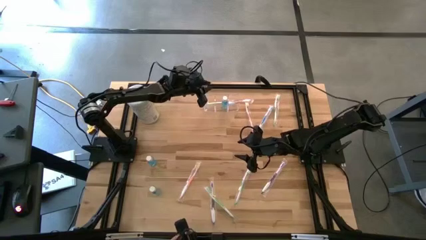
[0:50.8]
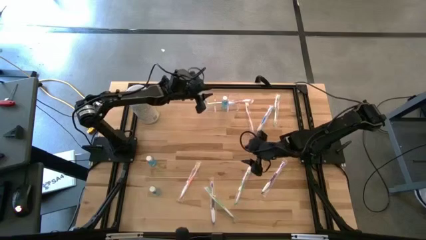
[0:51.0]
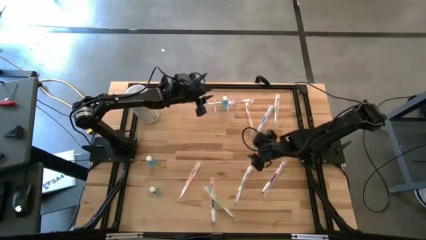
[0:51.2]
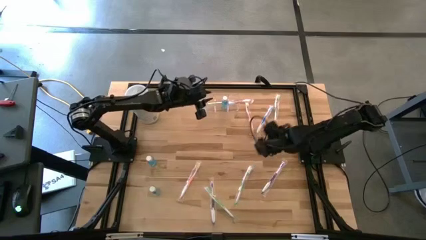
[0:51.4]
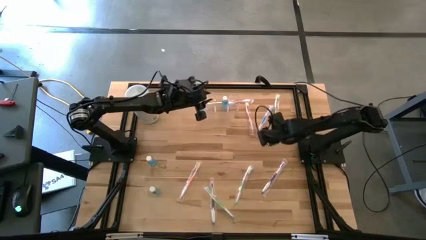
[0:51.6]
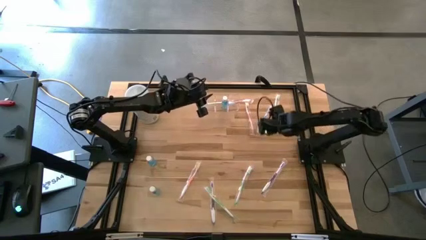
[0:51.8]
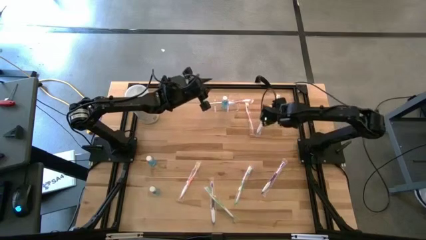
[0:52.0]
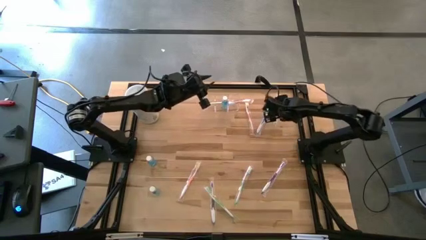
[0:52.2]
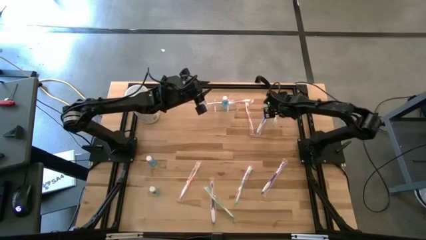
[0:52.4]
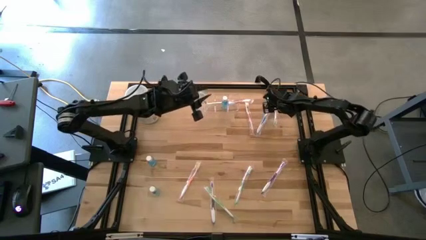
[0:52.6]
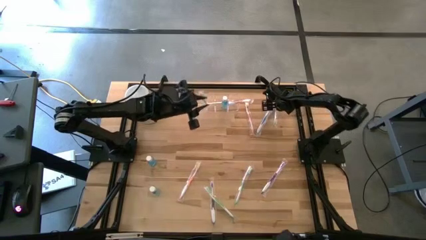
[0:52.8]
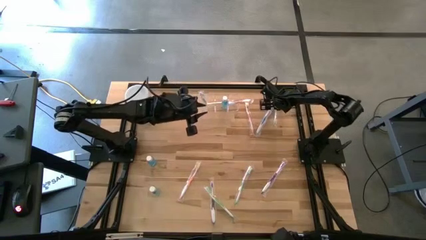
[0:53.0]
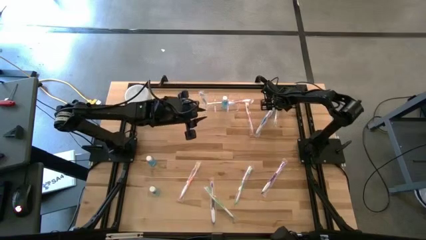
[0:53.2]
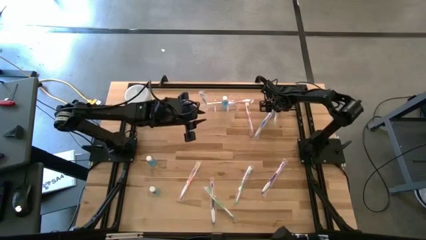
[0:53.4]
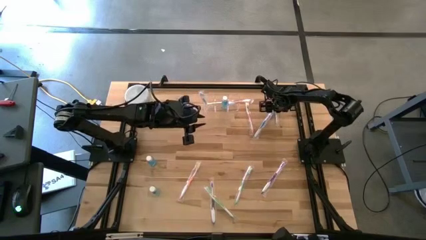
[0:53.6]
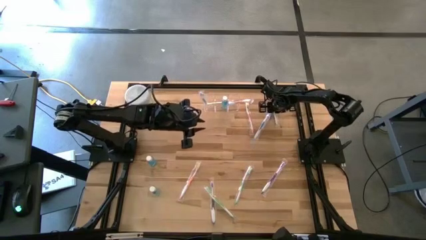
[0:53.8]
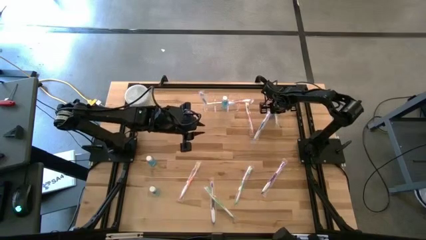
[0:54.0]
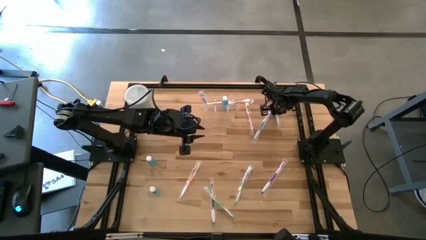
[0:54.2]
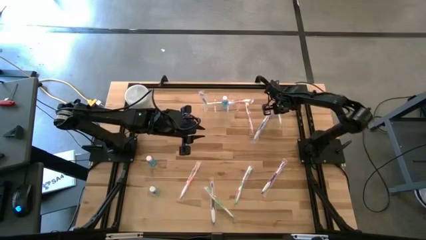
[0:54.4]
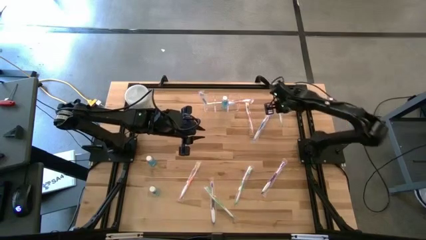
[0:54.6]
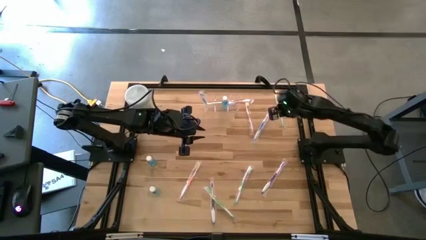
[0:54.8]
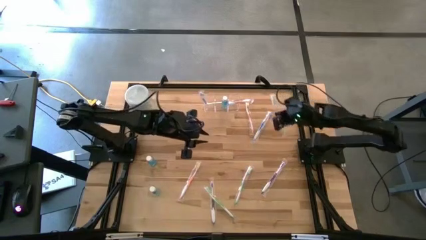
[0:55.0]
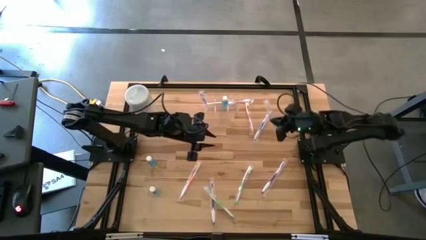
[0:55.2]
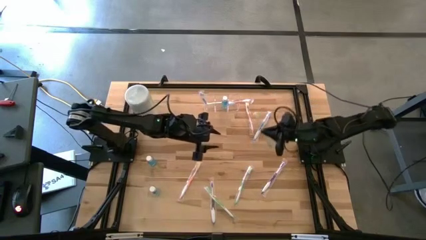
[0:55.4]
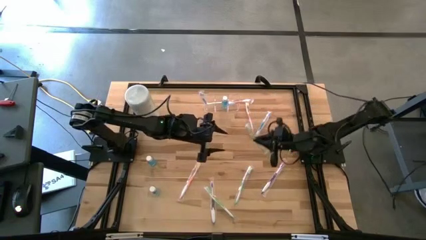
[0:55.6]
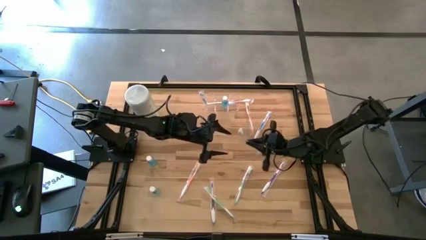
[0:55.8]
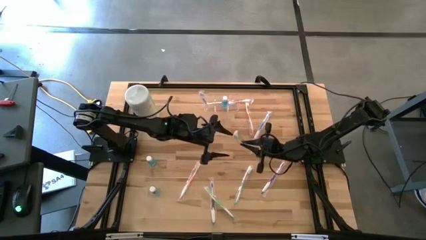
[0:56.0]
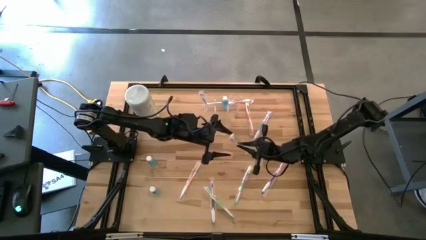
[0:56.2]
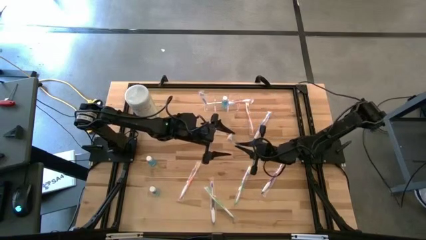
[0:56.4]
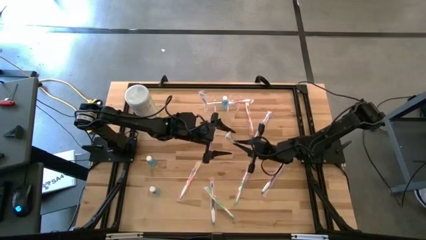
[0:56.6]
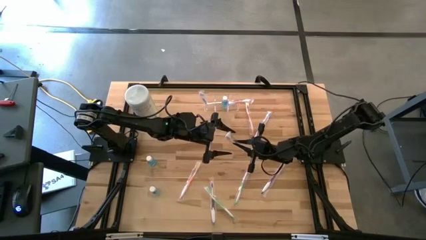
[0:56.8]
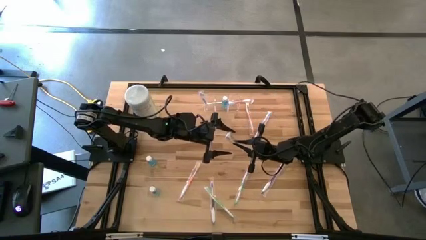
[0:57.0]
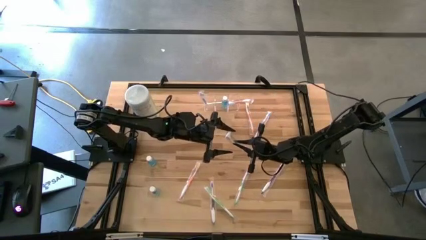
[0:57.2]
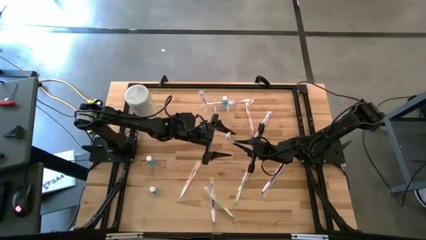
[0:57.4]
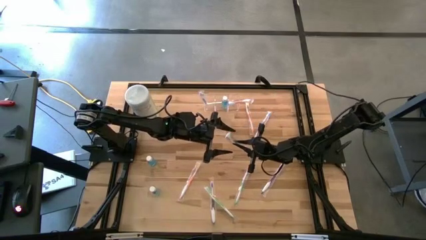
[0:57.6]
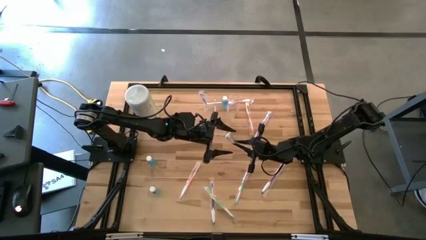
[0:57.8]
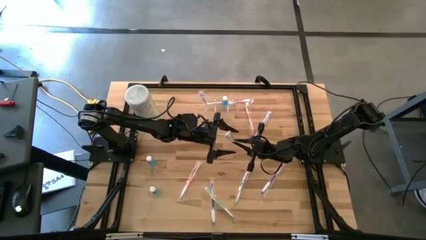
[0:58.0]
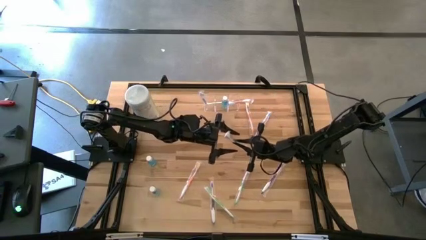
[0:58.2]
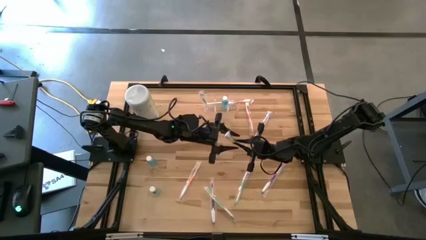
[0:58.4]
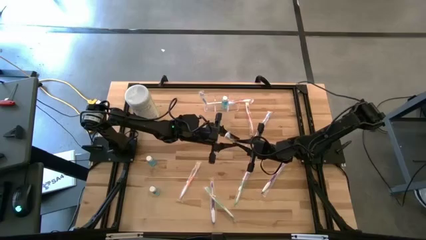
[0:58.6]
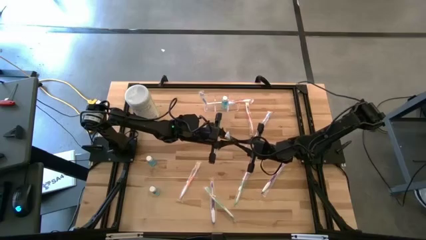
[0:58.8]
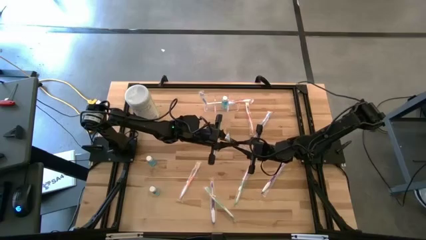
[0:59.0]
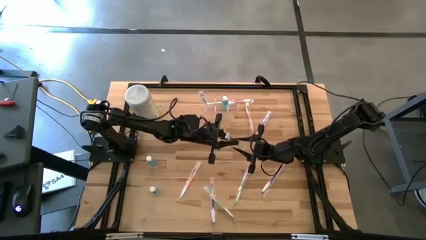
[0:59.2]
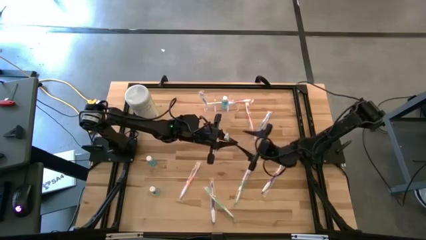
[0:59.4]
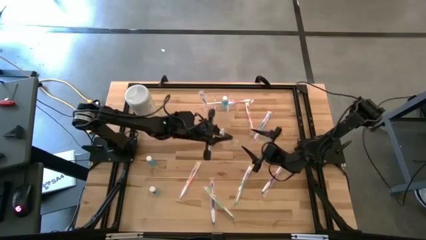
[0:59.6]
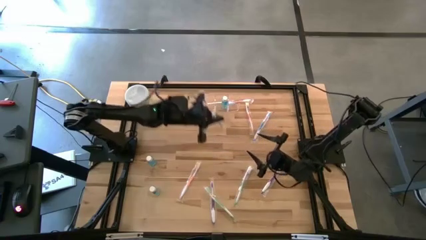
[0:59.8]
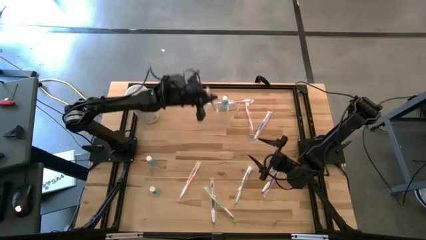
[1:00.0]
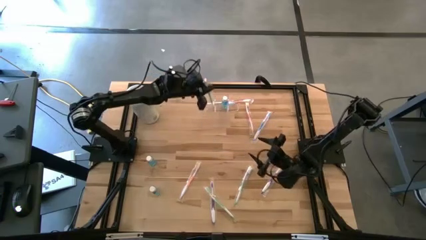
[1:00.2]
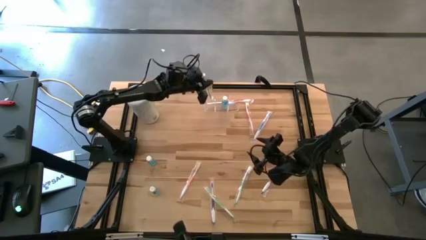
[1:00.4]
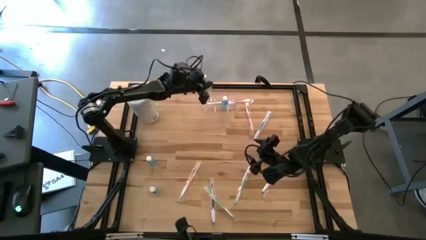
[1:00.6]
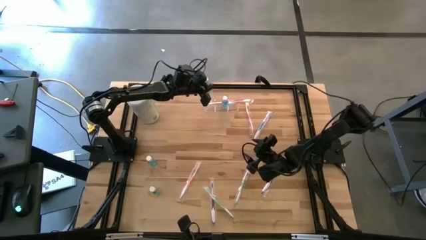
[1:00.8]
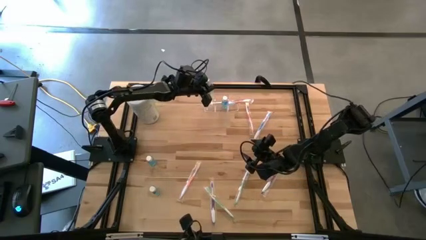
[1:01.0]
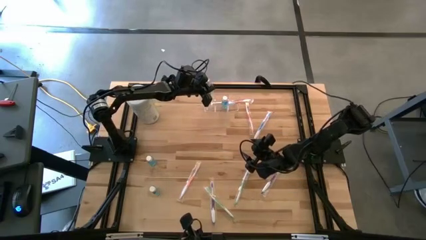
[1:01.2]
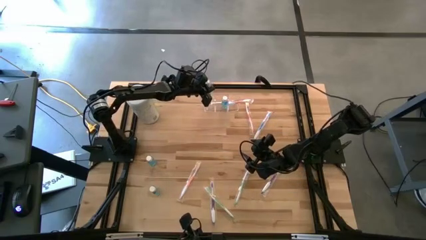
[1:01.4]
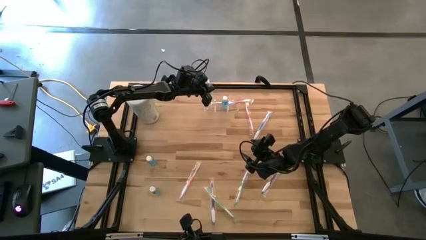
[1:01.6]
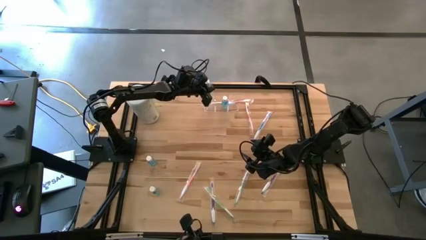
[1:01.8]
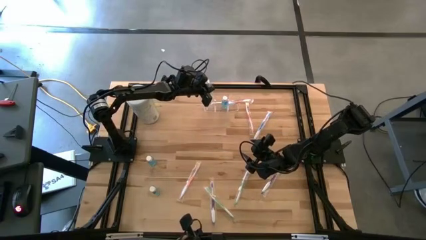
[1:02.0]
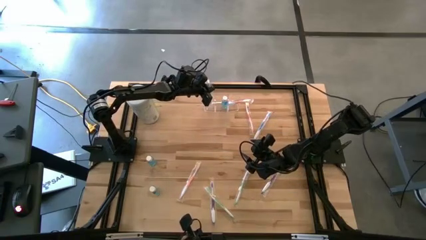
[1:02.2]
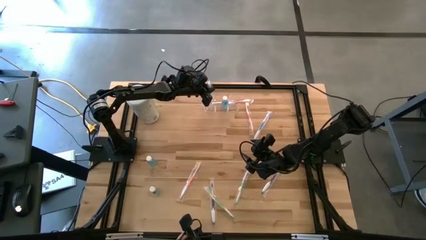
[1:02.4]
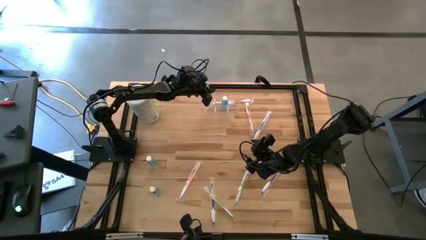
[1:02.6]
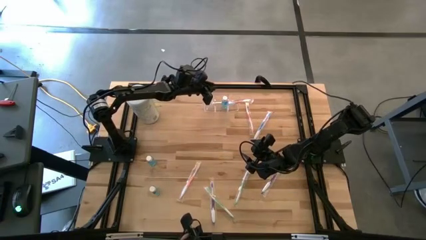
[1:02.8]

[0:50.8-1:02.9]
Task: Pick & Place toothbrushing station
Put the top right green toothbrush into the transparent organizer

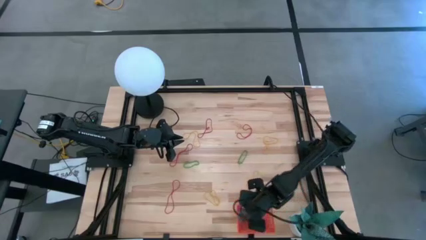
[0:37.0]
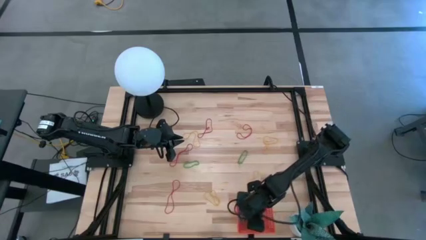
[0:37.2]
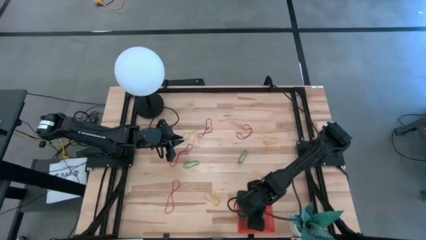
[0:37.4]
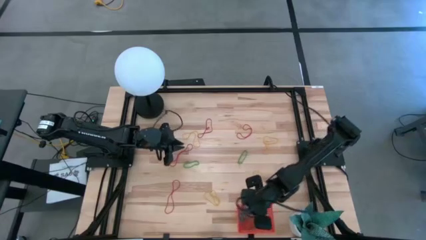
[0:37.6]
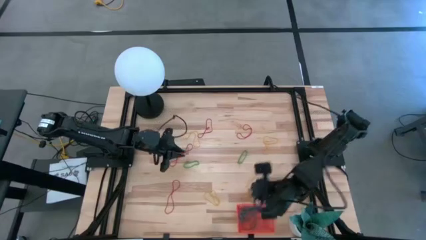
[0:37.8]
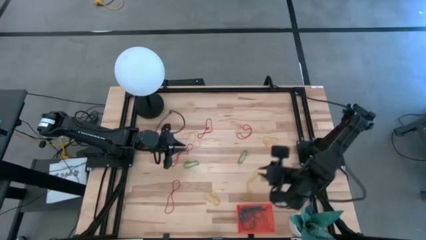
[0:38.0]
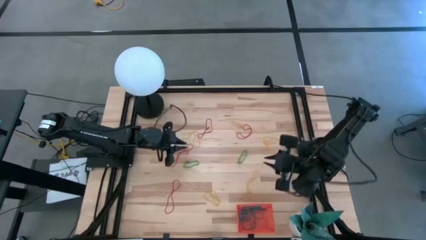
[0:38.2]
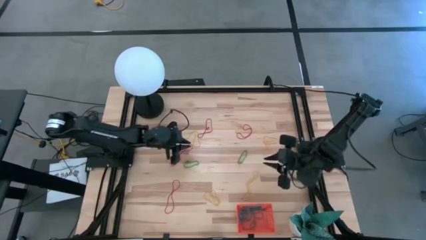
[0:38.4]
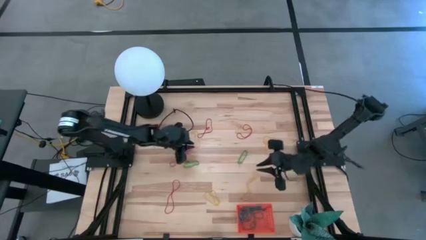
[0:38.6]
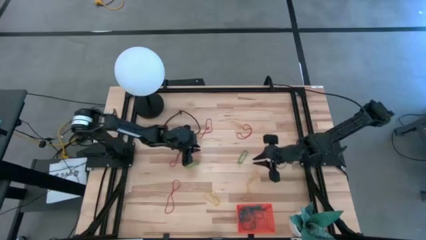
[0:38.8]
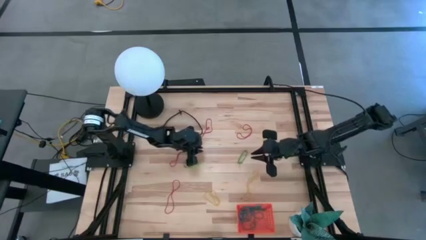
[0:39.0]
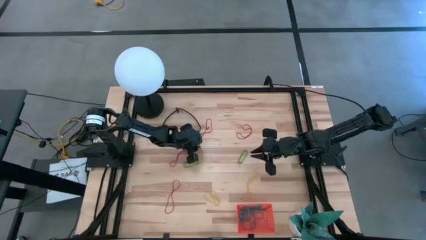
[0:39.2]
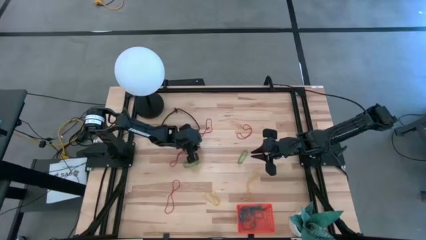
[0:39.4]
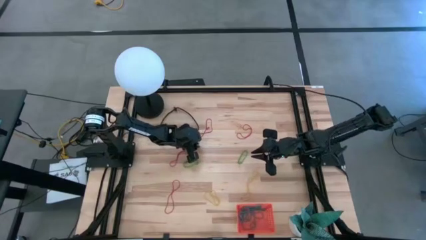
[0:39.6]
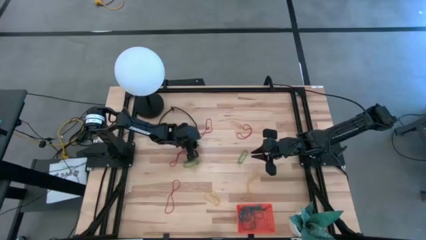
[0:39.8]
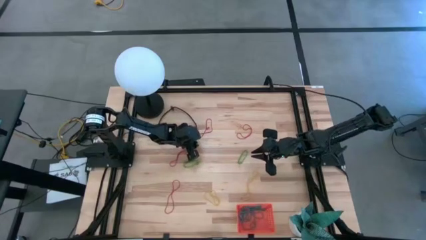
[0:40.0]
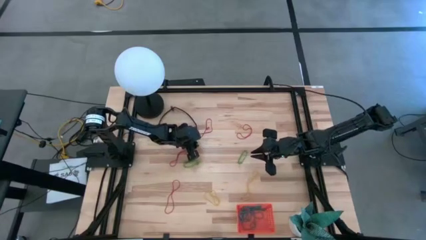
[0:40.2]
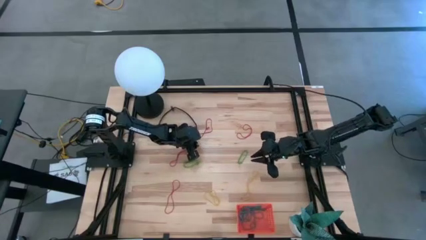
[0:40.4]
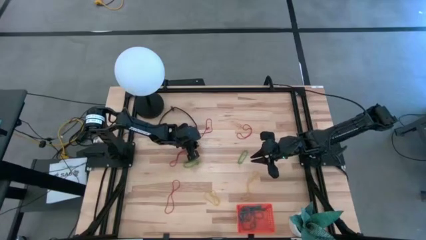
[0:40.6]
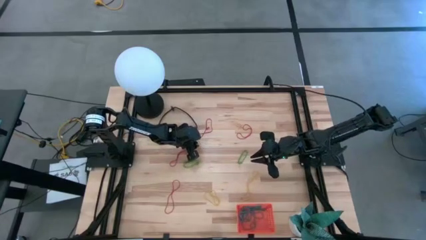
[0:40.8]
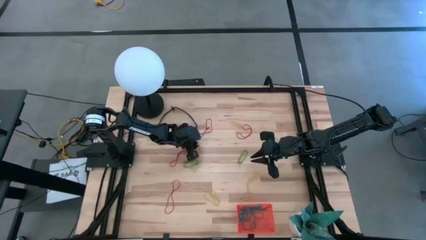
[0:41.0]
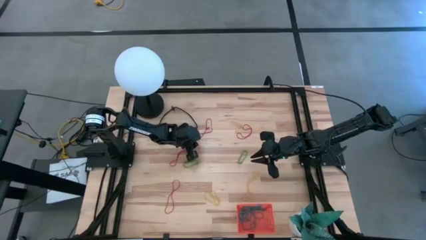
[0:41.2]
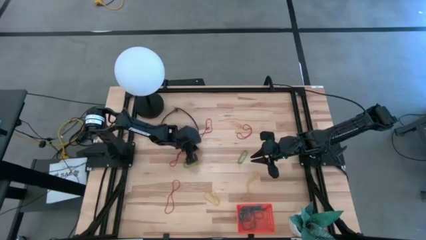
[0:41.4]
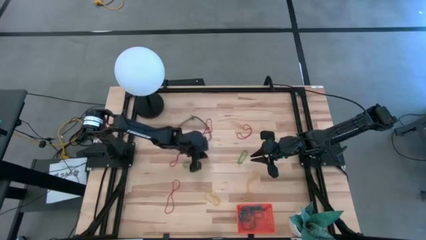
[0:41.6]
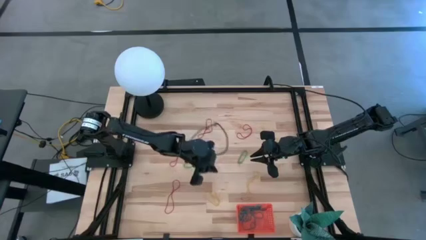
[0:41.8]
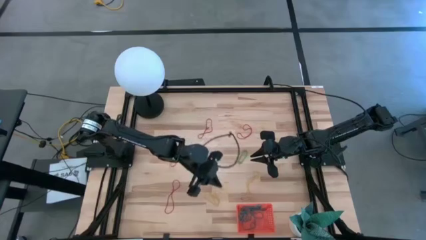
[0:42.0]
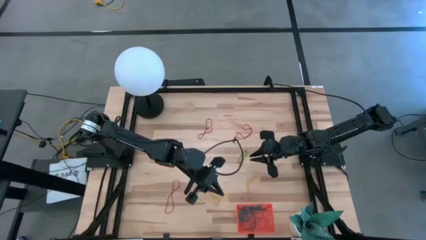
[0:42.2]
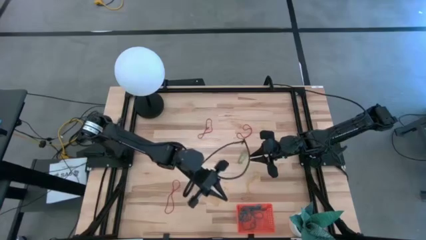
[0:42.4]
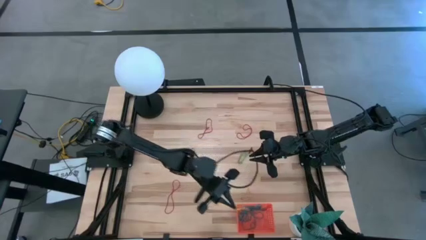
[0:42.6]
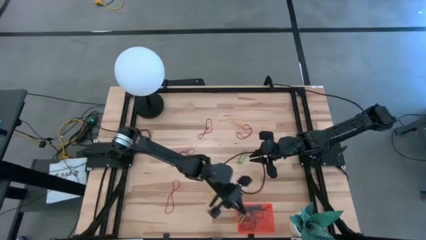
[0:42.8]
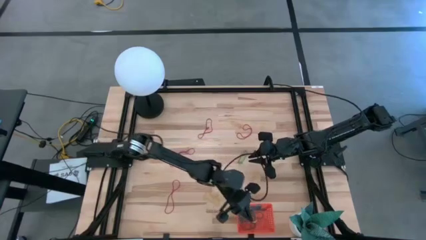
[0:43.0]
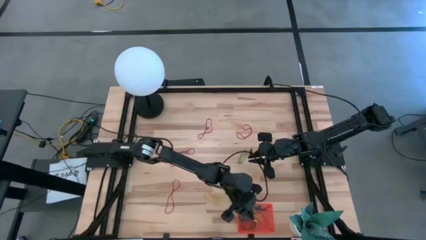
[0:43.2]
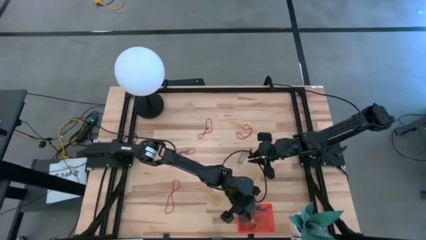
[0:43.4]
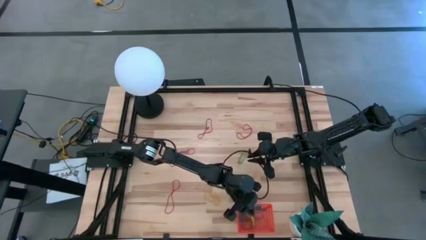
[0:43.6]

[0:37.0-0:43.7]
Task: Pick and place items into bin
Put the yellow rubber band into the orange bin
